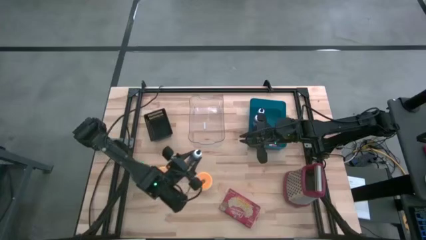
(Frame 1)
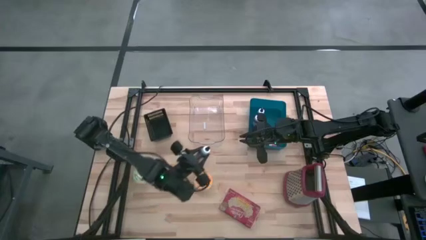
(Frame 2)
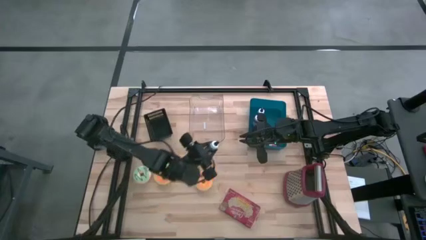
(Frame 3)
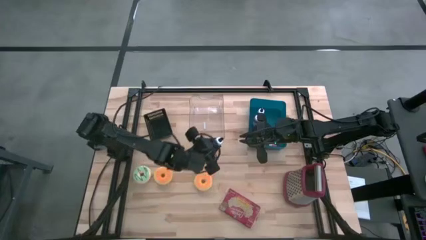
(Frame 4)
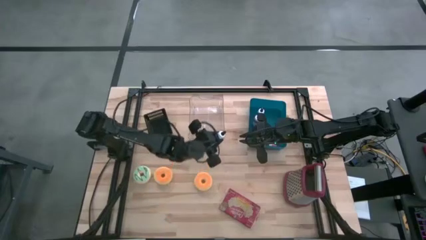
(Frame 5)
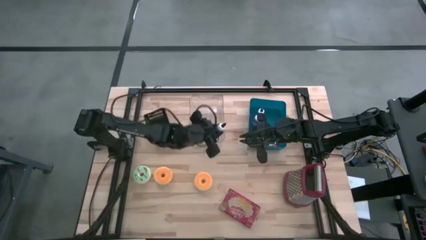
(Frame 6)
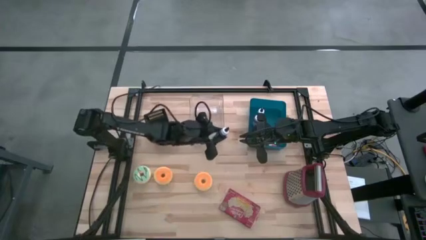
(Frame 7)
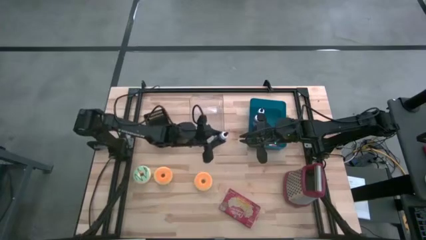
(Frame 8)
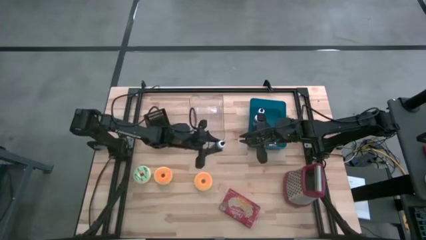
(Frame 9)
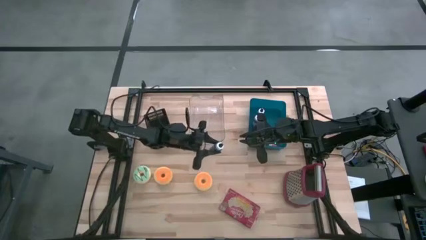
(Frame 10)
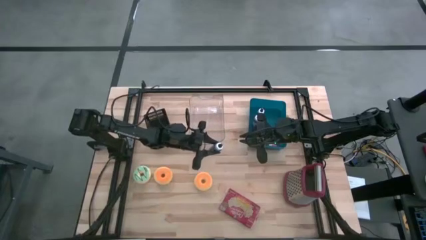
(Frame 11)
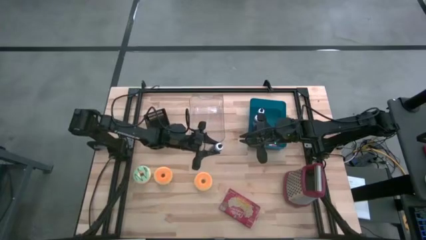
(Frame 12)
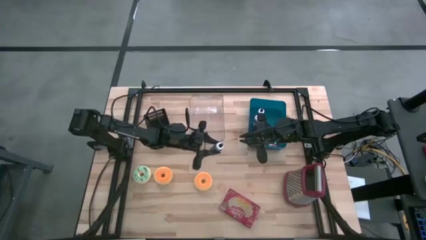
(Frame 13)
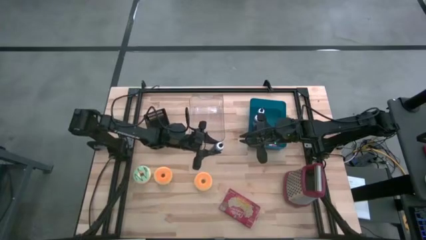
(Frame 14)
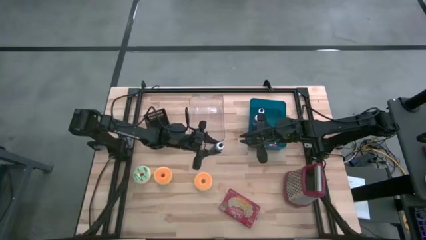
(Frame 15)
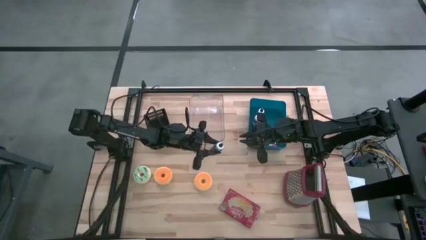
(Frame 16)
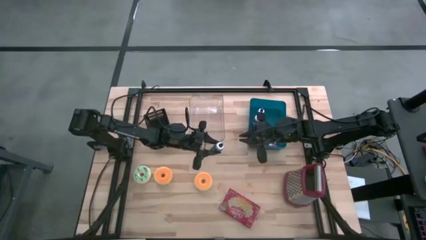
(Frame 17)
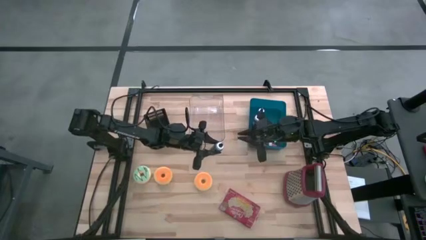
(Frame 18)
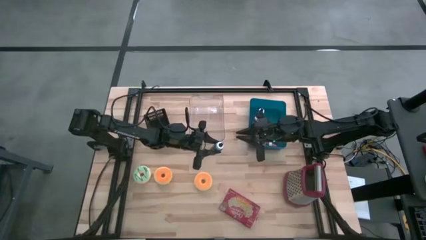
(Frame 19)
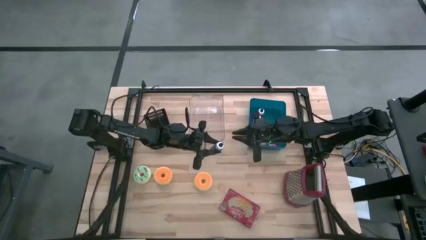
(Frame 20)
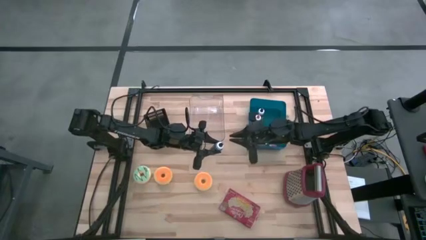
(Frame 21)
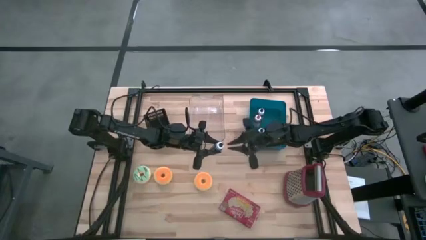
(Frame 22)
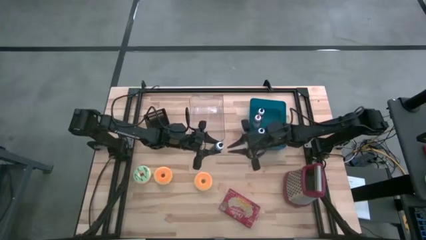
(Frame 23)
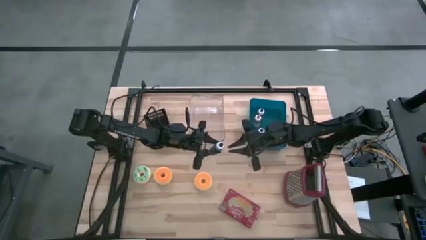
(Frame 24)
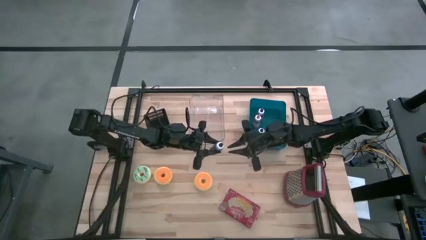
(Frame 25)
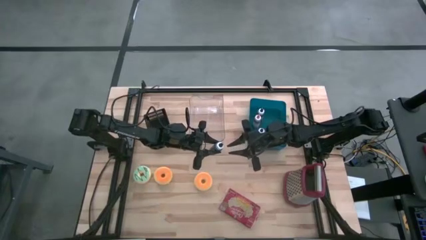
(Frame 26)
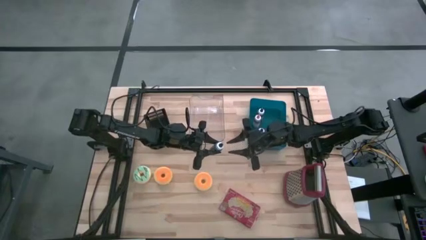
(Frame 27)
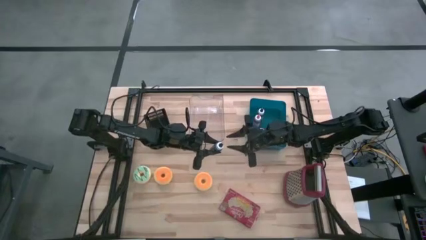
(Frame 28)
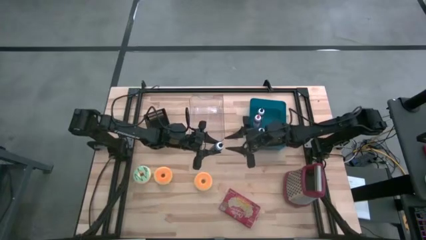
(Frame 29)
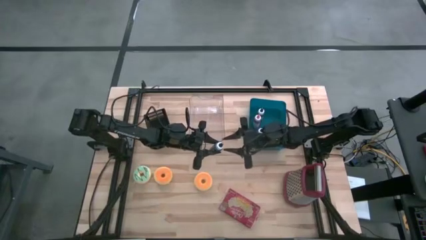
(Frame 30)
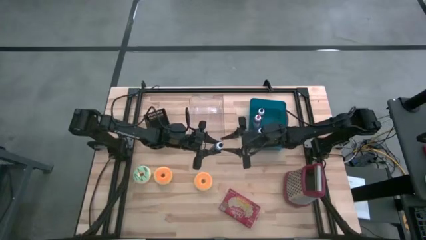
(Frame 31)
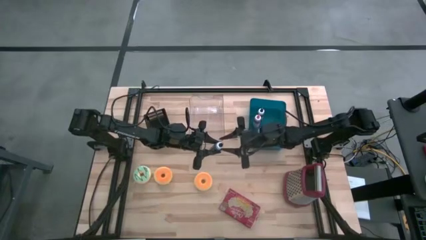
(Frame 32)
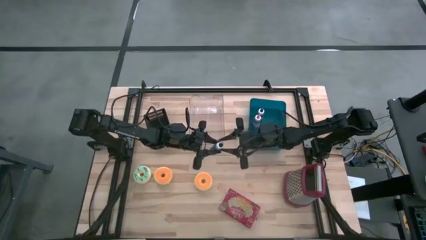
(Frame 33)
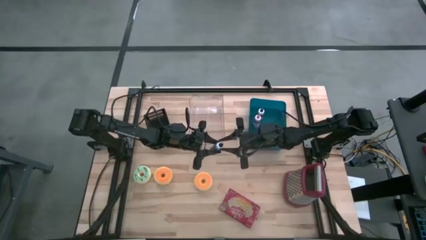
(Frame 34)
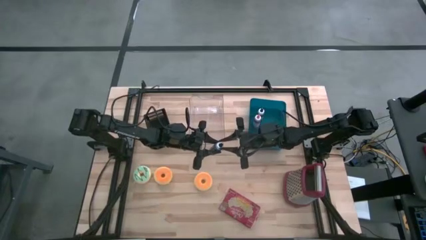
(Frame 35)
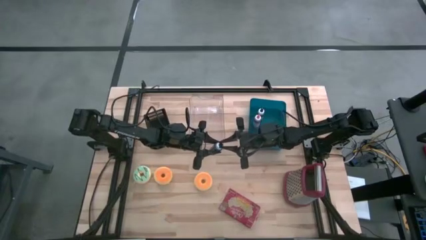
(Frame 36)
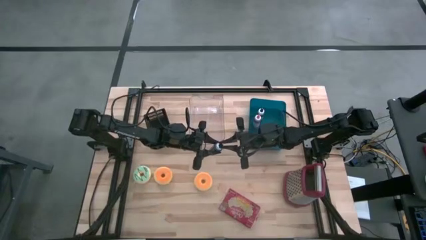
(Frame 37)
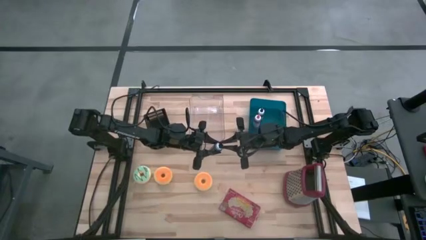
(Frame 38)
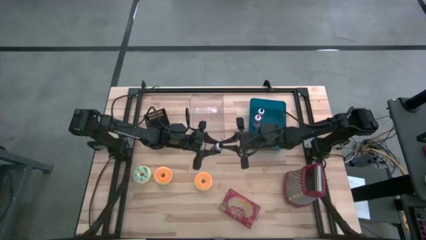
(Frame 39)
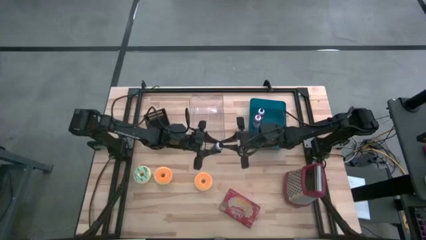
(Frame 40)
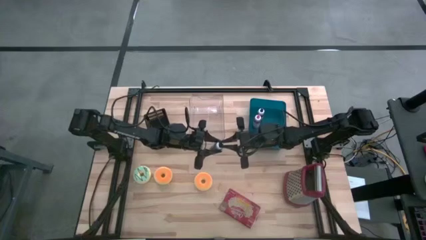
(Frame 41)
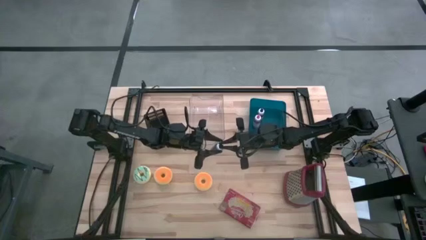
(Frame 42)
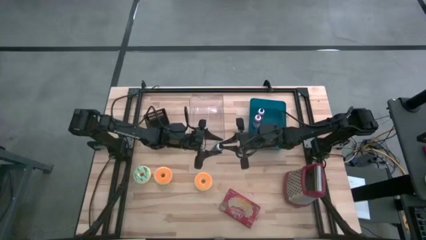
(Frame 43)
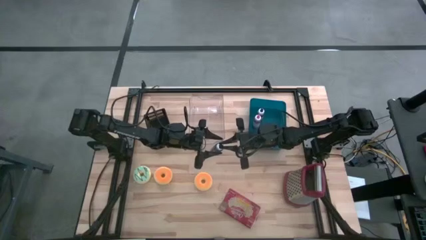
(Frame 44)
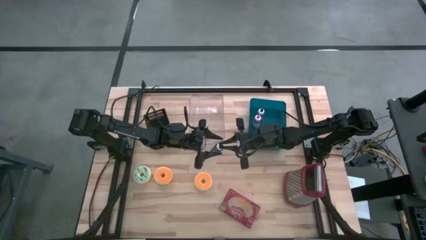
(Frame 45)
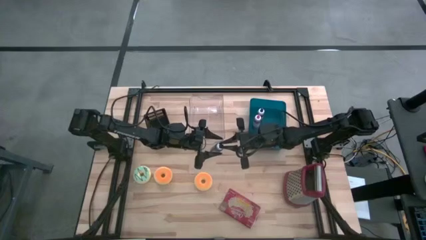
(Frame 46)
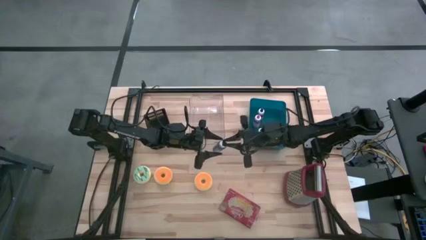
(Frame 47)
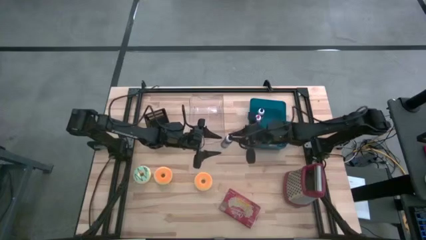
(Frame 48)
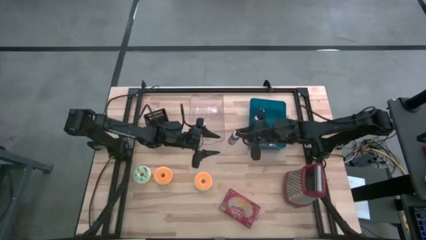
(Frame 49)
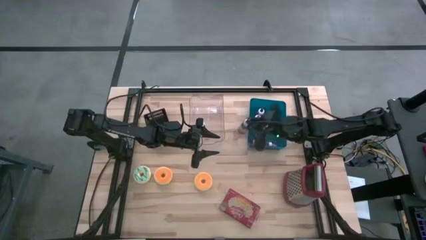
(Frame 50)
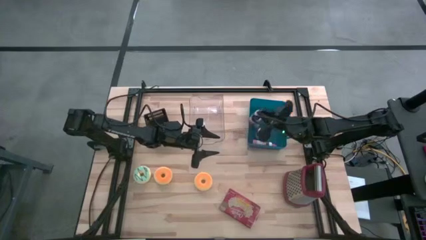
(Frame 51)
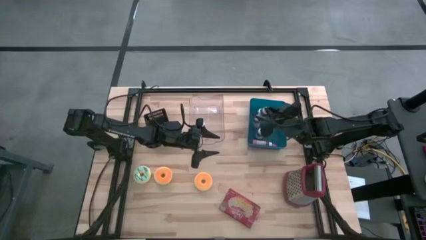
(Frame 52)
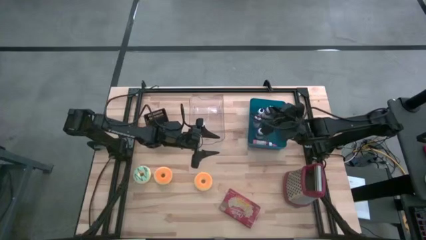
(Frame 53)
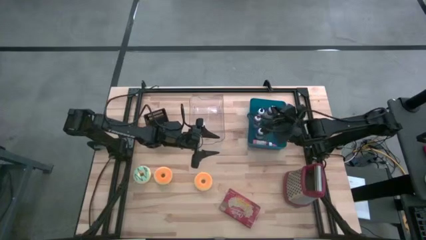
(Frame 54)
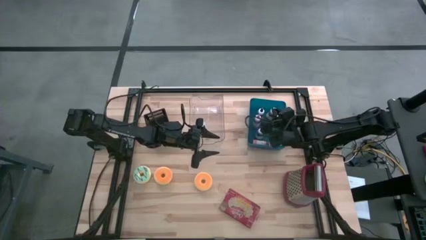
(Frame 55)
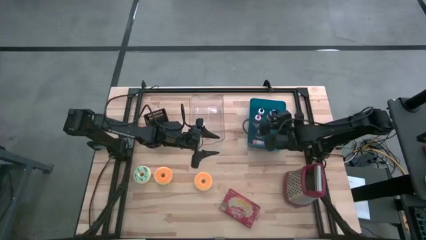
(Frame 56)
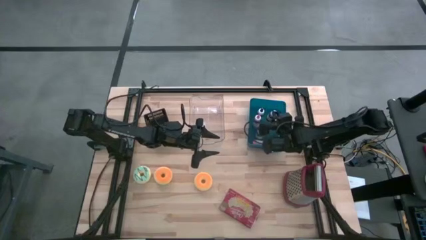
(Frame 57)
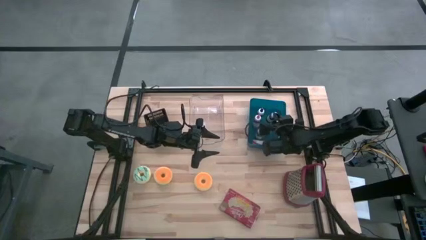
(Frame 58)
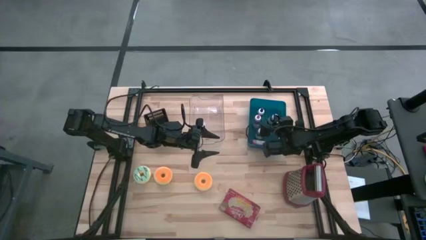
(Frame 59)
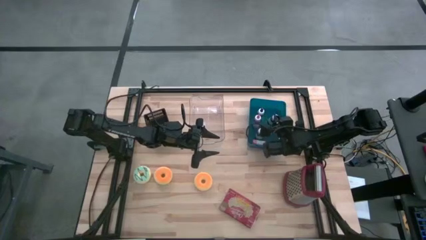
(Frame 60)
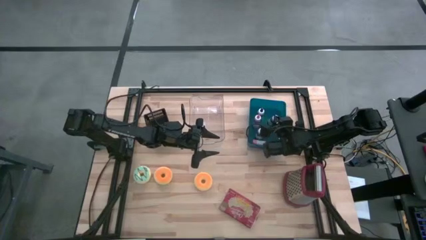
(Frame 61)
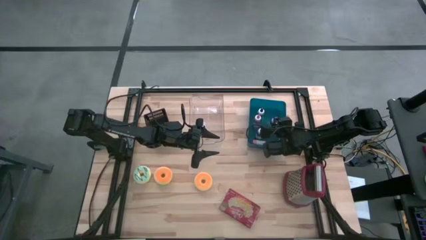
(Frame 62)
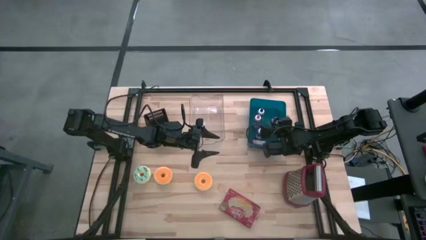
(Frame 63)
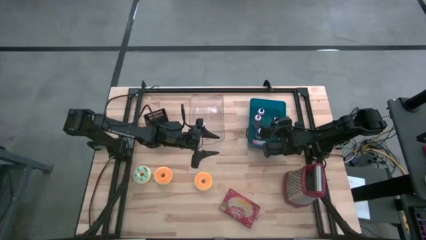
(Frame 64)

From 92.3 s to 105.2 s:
Task: Pick & Place Food Item
Put the black food coloring bottle into the blue bin
